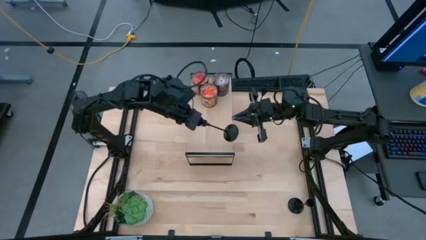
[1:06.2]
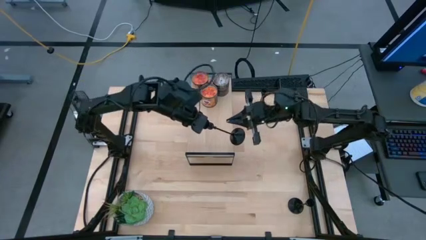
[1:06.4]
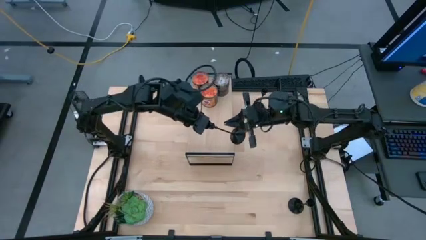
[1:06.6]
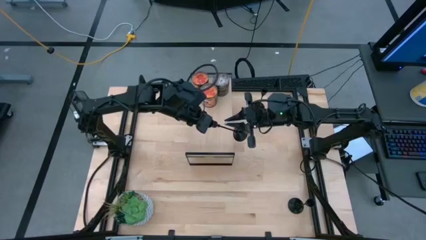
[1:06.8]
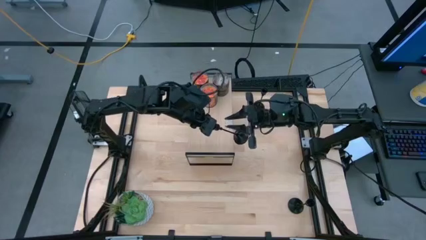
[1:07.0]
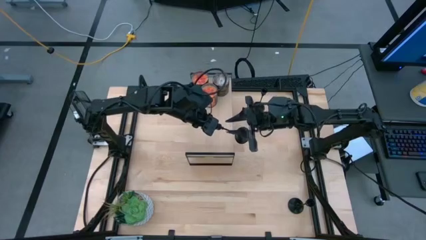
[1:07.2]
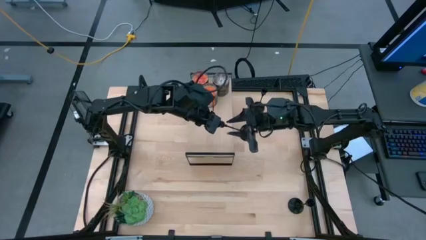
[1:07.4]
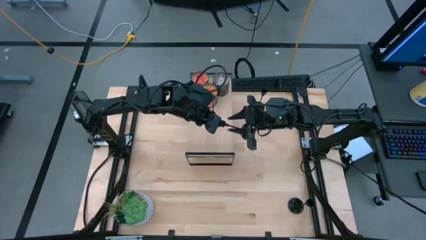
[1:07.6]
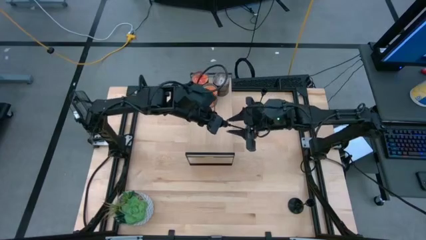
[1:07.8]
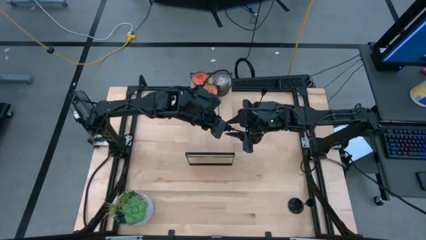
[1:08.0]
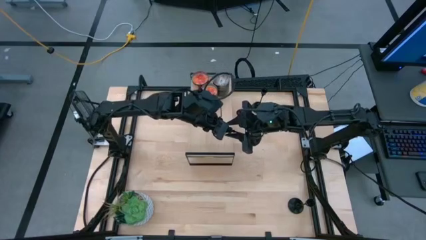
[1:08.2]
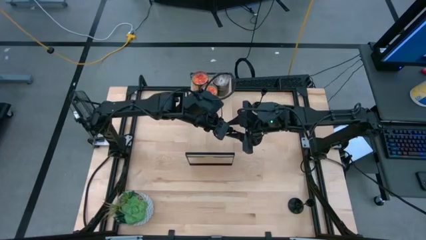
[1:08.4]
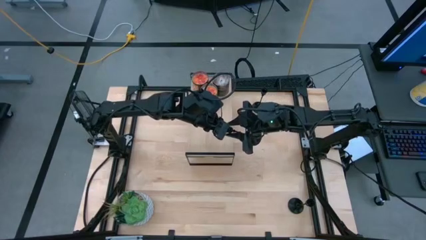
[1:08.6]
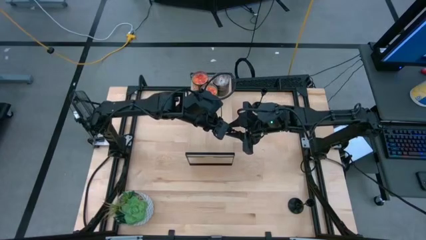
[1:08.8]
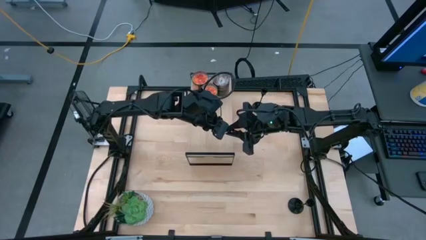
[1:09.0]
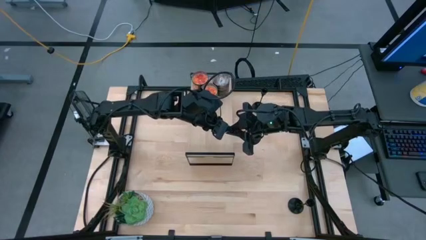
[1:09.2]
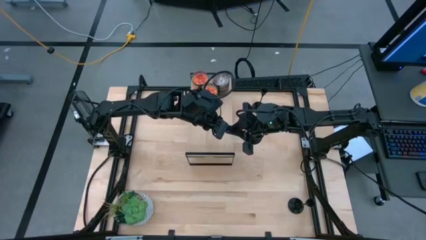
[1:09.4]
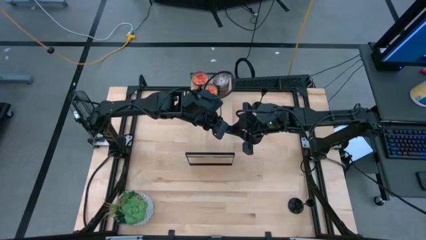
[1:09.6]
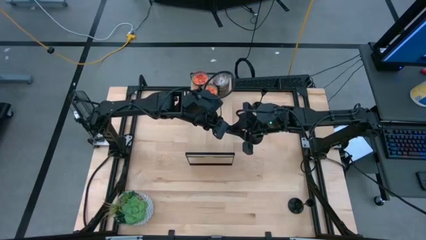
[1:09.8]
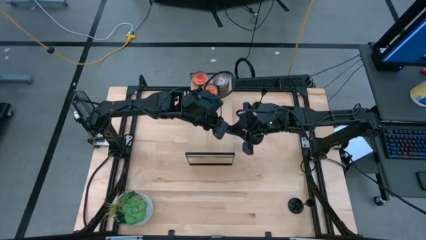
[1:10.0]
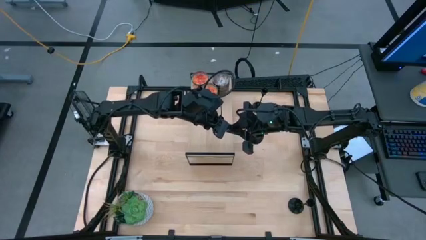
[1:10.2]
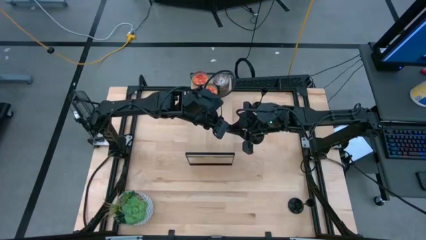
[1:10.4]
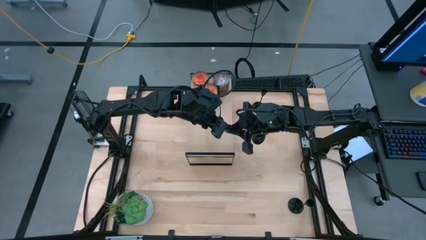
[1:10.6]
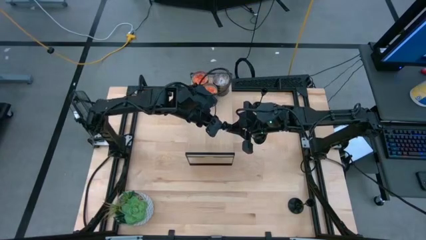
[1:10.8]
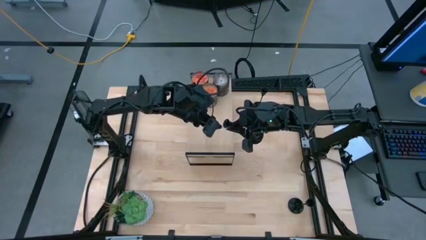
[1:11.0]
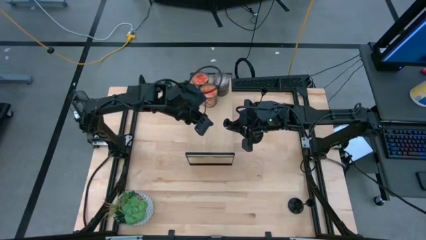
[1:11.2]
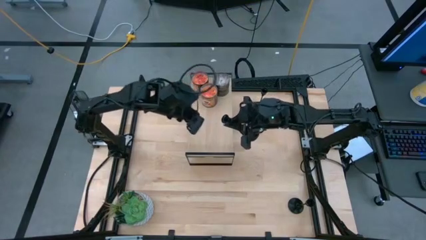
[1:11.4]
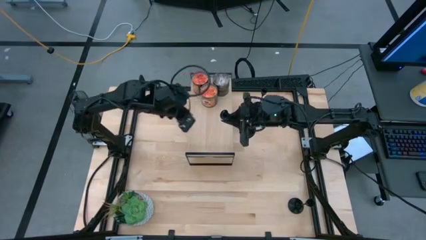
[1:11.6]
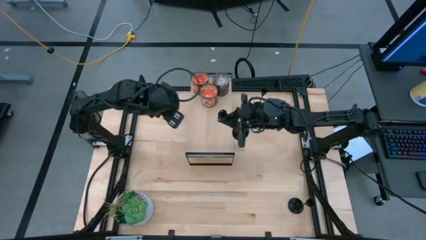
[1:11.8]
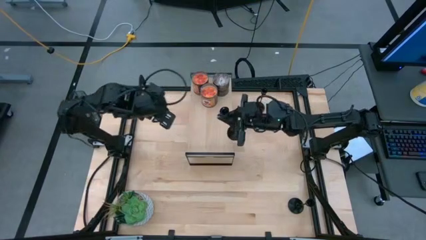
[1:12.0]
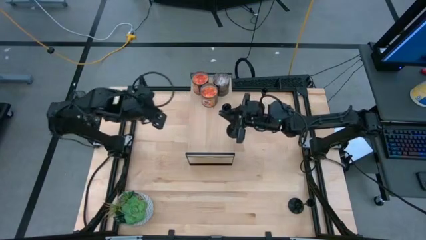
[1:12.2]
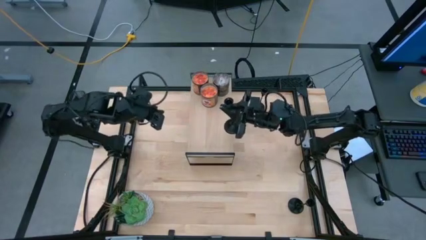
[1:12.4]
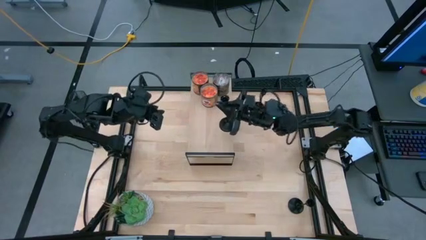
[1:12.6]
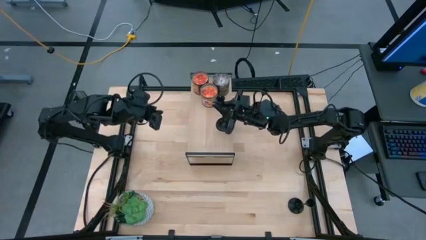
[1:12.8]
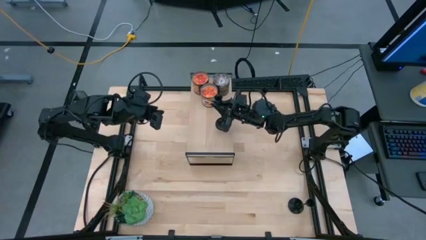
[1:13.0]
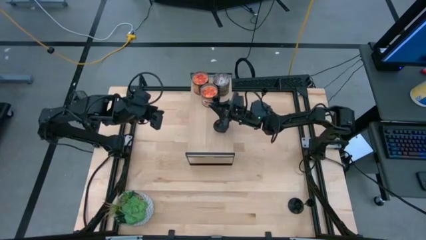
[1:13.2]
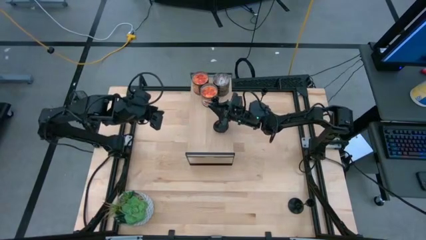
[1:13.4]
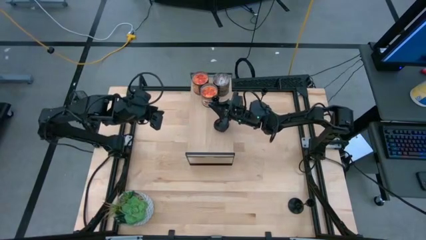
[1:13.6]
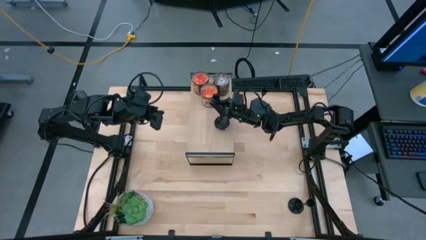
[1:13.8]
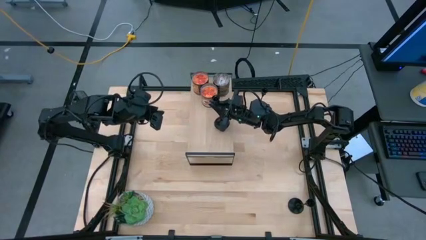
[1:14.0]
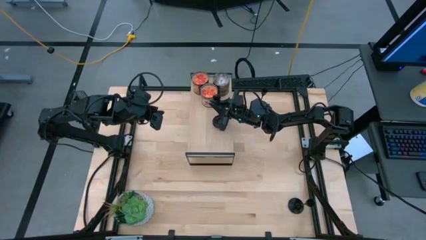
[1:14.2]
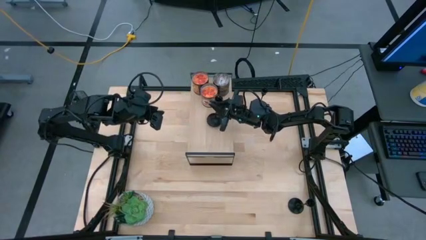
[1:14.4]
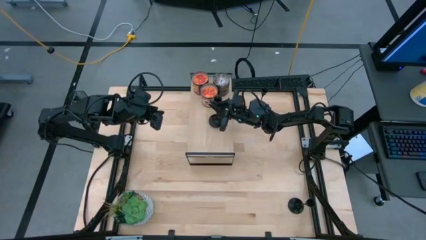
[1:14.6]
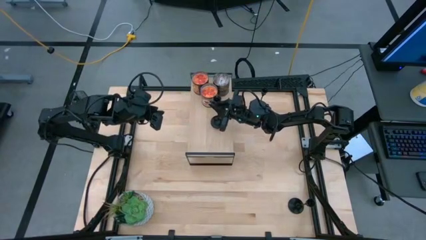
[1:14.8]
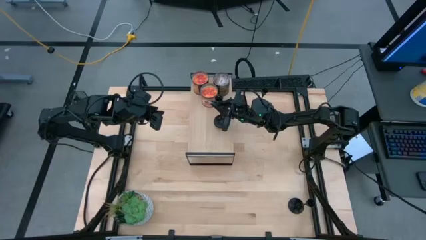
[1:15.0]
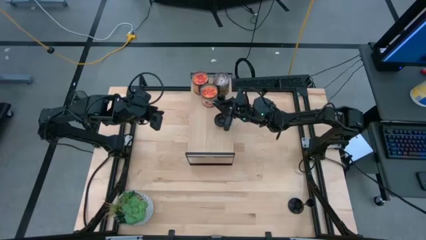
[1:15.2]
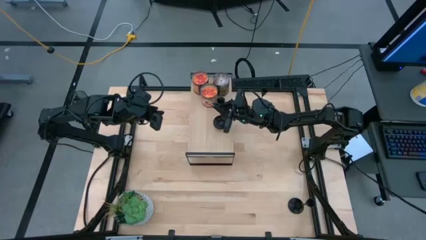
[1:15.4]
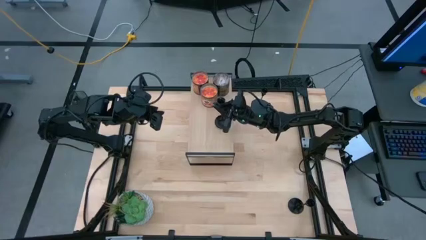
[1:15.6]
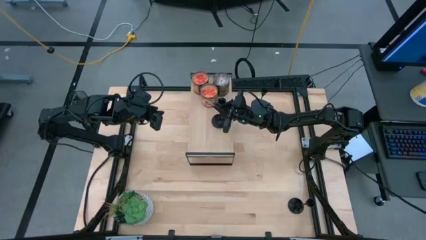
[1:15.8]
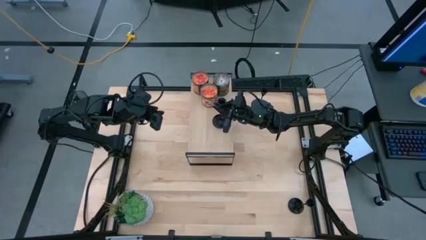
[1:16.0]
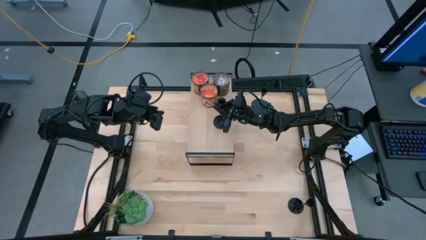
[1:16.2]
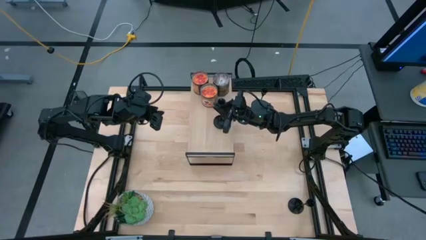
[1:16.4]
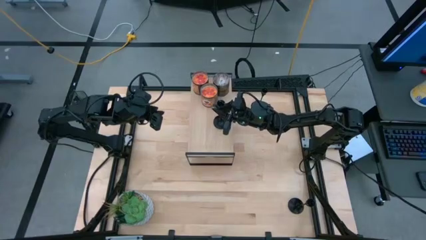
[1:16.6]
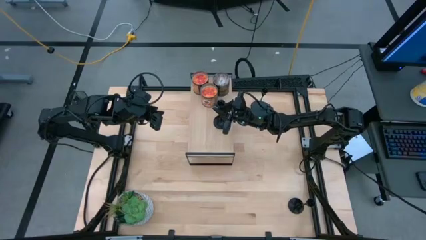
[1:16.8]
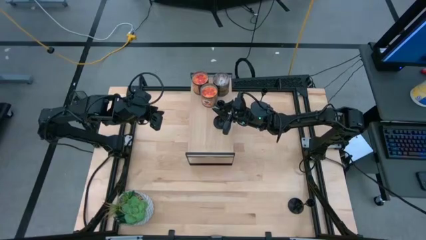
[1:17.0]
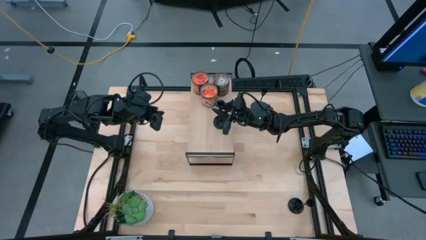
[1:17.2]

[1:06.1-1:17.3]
Task: Pick & Place candle stick holders
Put the left black candle holder on the shelf

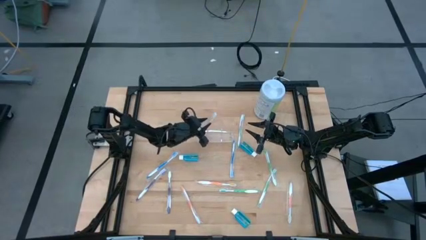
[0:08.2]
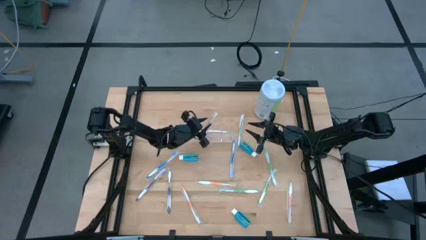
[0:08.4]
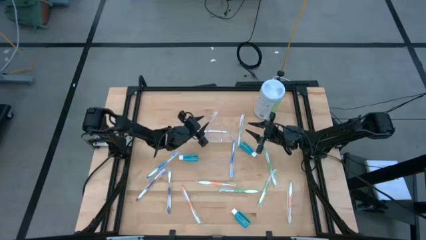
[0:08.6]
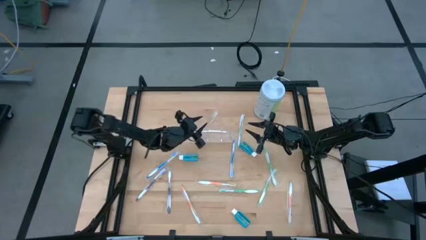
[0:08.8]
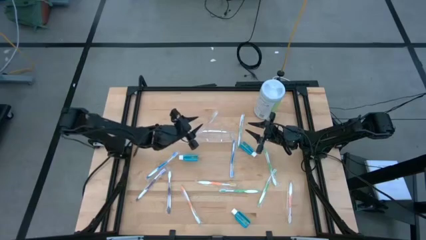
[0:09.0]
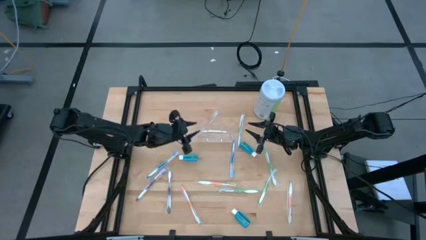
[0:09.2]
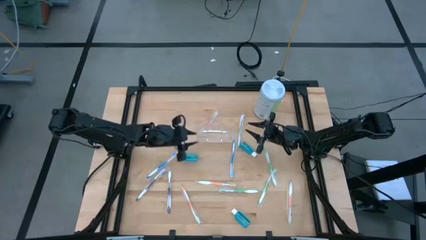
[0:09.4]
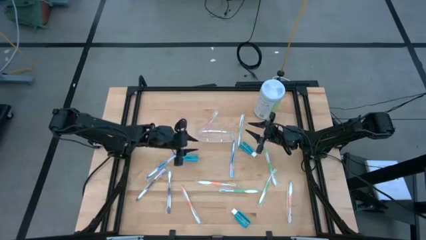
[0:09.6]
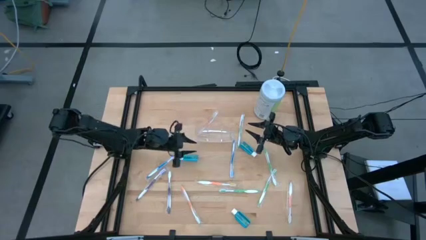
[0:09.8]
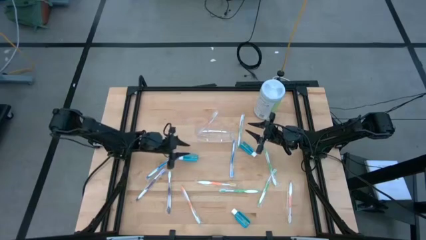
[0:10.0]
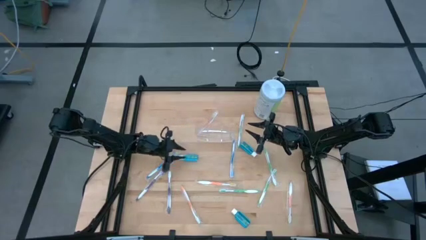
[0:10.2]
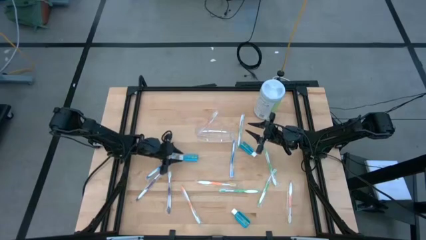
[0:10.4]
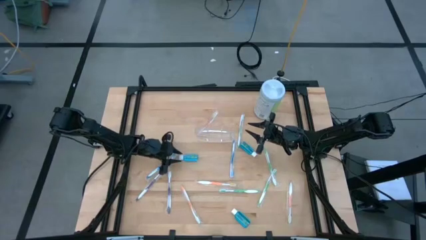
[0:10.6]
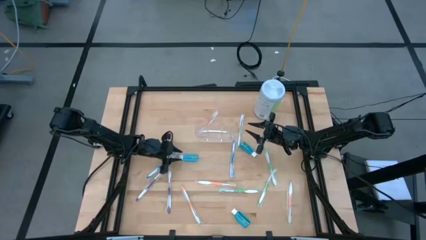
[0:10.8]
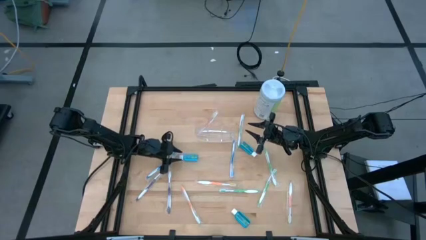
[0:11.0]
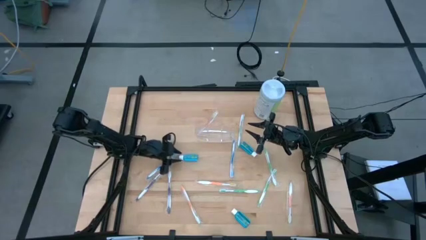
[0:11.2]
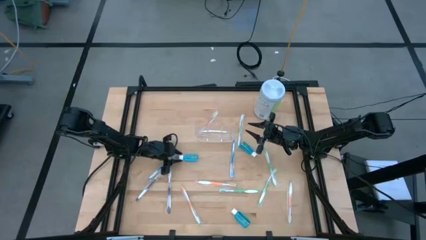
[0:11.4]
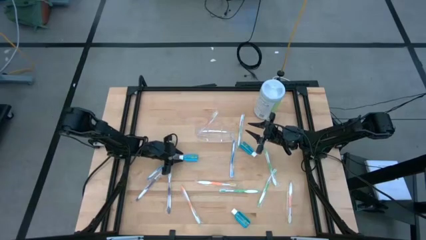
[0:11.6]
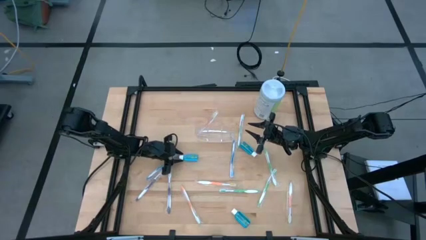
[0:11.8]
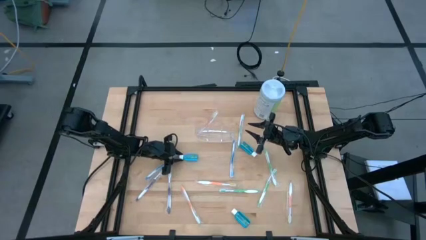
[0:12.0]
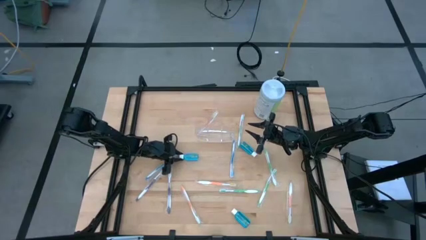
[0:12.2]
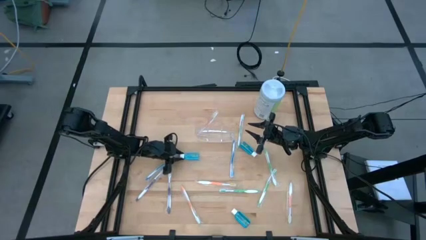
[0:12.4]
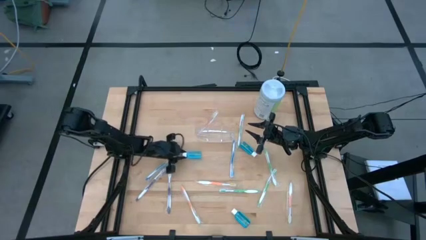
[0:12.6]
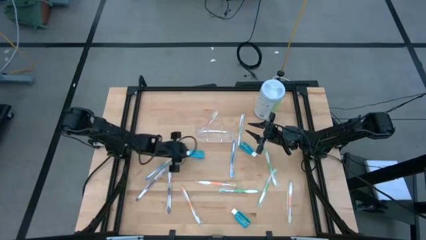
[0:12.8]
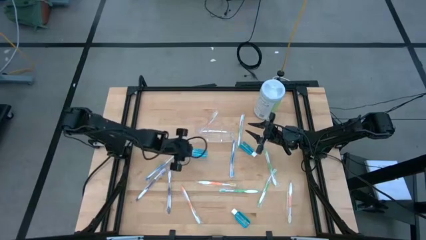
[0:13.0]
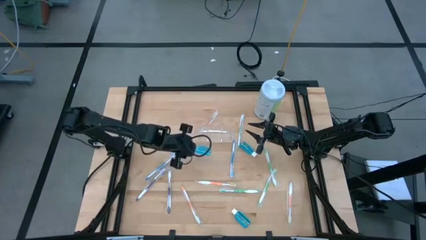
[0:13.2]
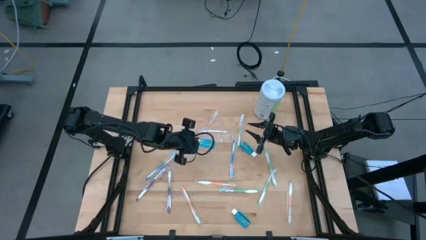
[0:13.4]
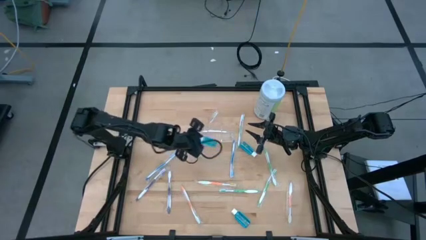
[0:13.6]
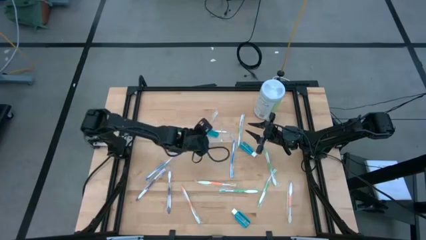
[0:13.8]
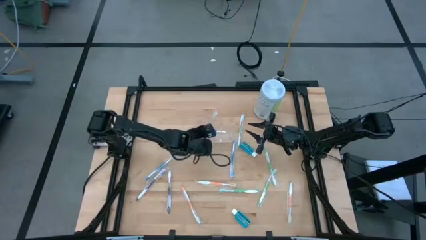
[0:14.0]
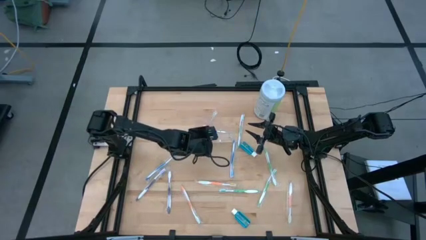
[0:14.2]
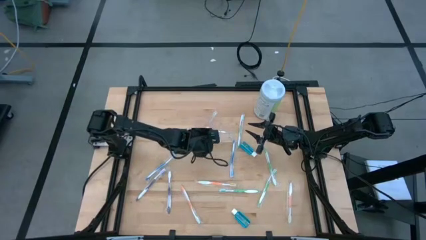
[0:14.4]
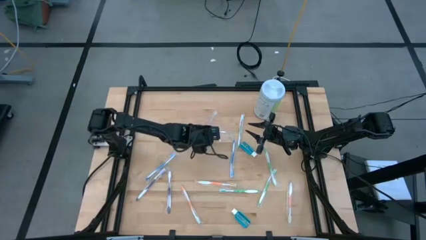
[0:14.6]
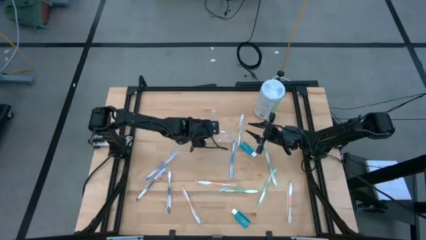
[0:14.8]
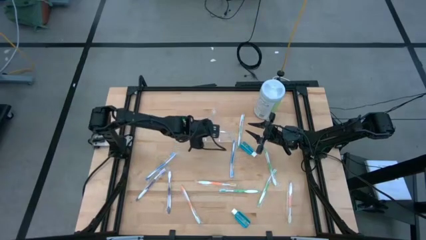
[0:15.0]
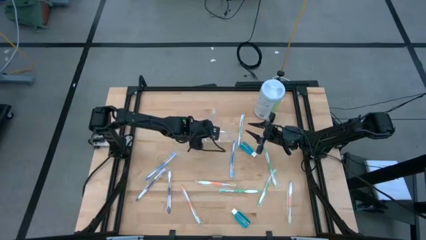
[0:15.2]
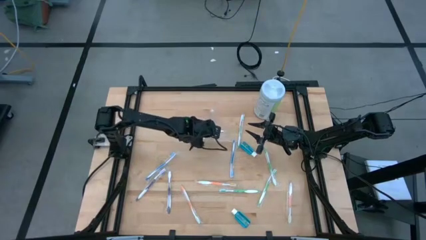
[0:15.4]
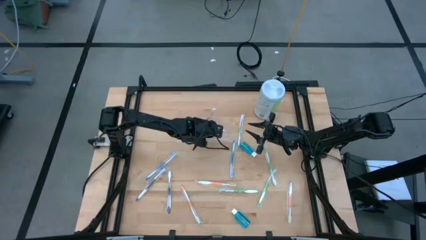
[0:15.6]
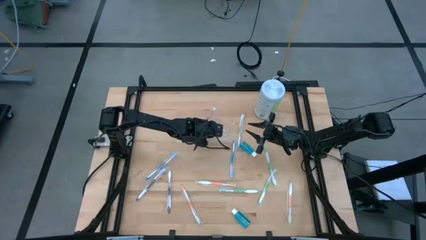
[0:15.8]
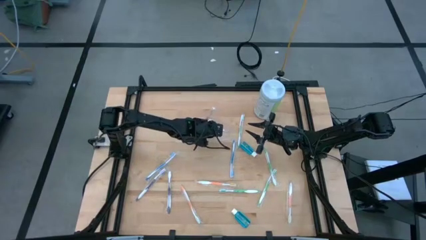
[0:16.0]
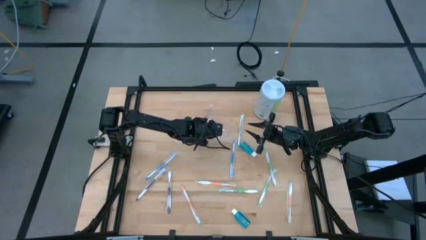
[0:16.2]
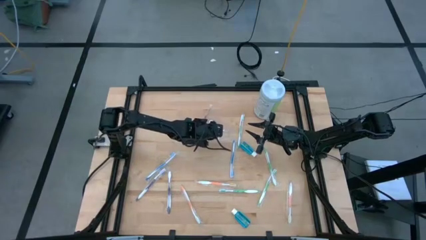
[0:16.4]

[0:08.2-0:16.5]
Task: Pick & Place toothbrushing station
Put the left mouthwash into the transparent organizer
